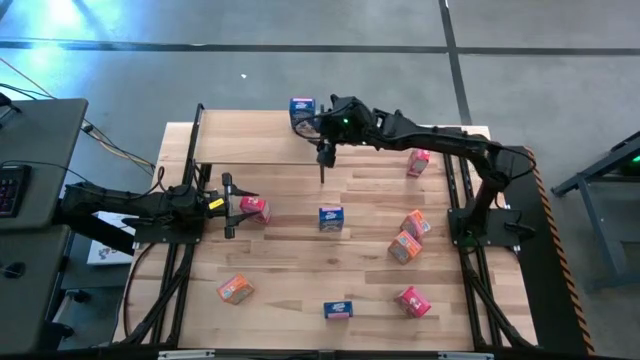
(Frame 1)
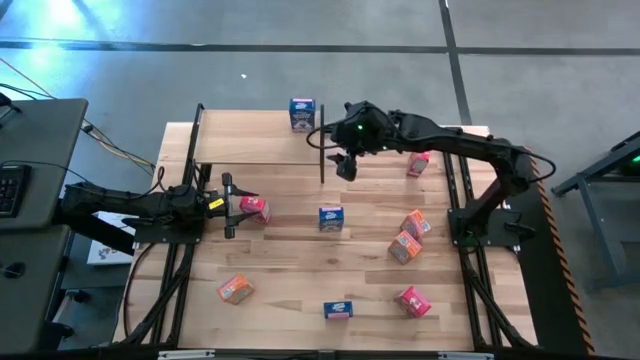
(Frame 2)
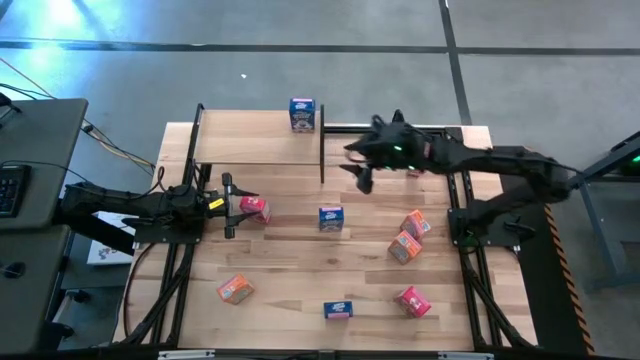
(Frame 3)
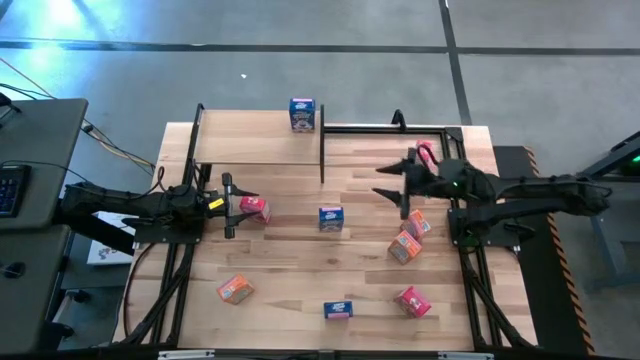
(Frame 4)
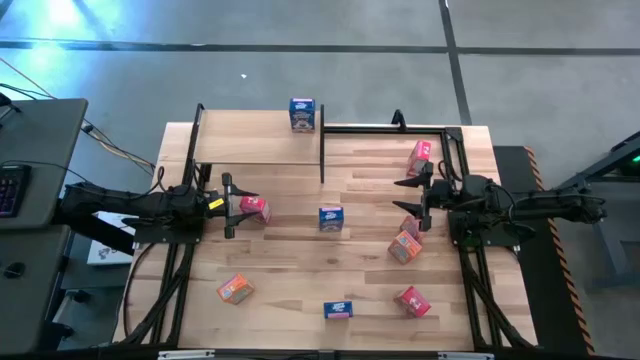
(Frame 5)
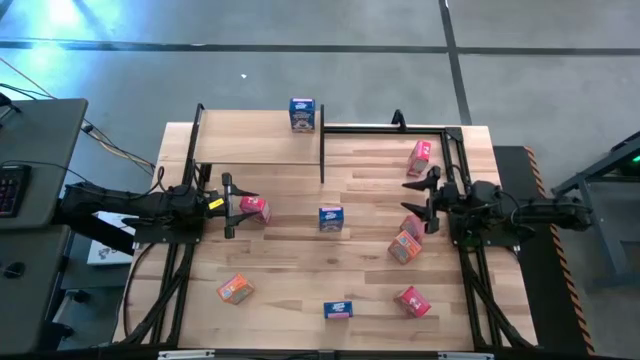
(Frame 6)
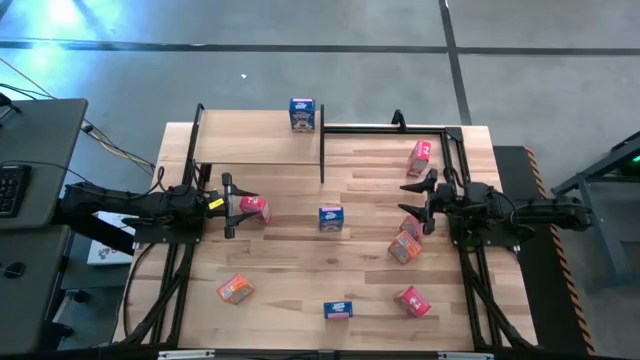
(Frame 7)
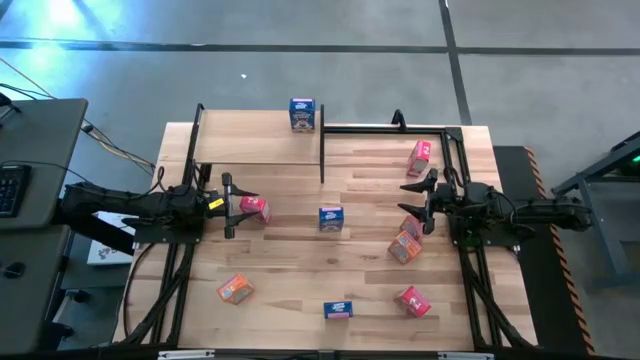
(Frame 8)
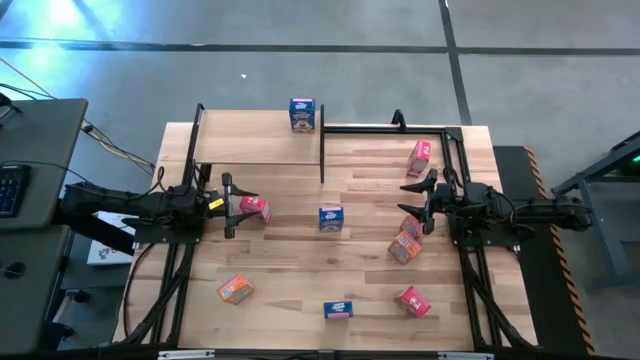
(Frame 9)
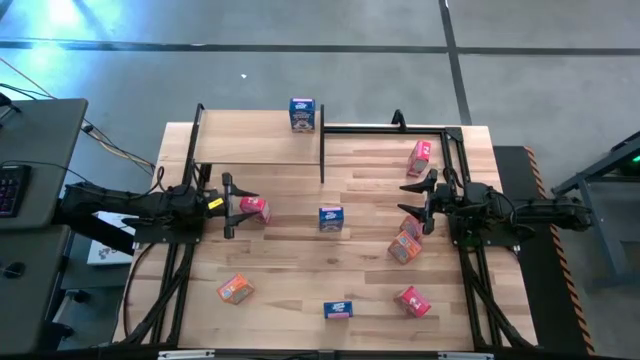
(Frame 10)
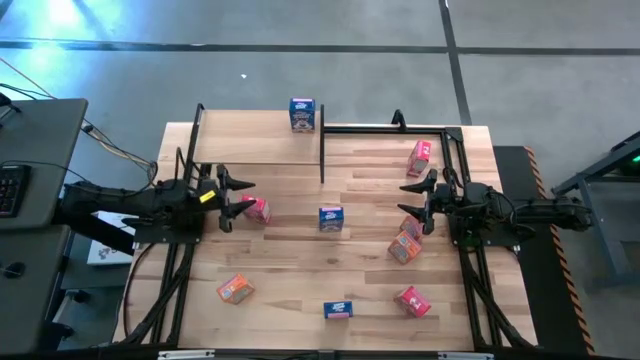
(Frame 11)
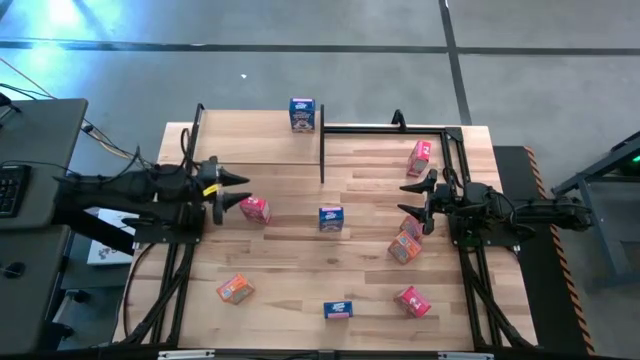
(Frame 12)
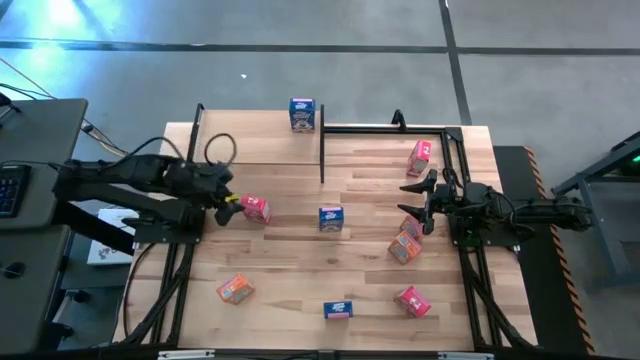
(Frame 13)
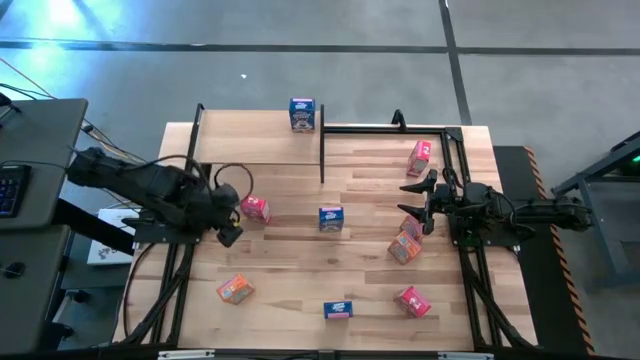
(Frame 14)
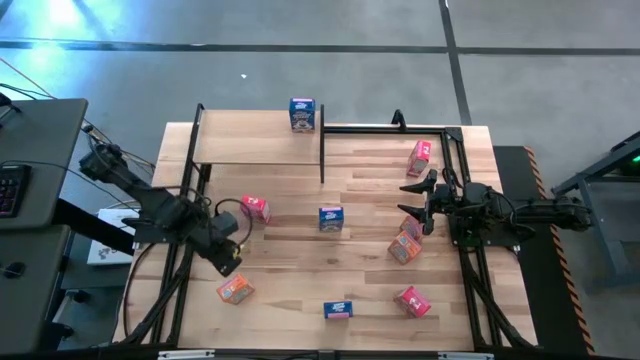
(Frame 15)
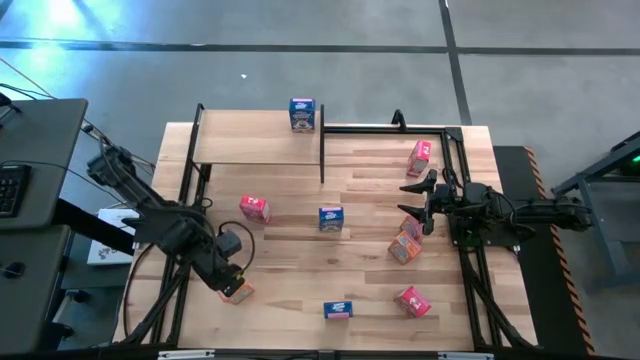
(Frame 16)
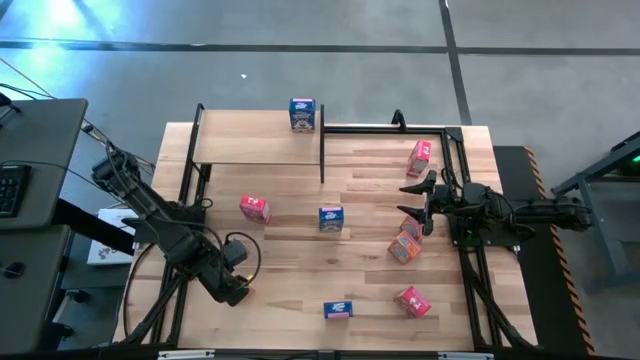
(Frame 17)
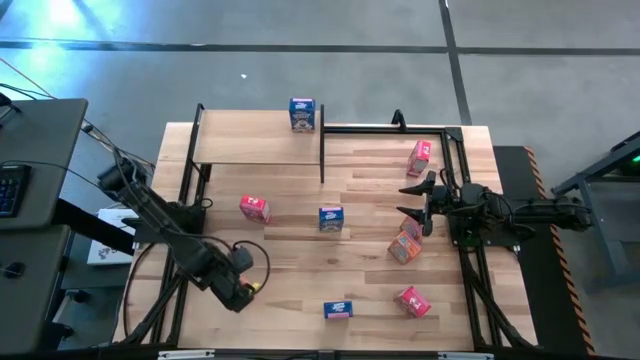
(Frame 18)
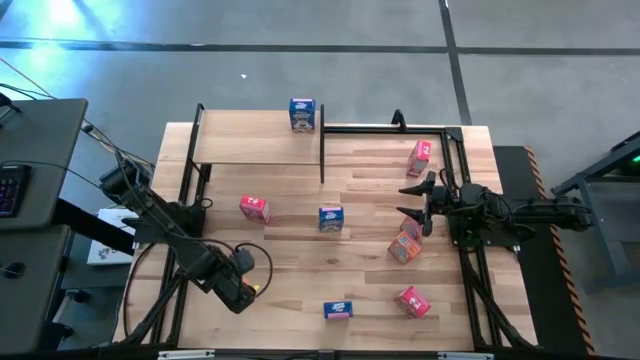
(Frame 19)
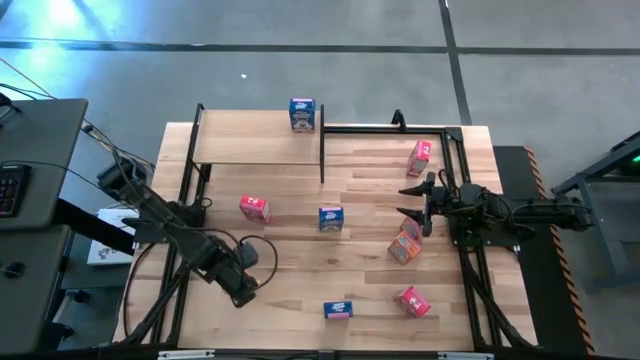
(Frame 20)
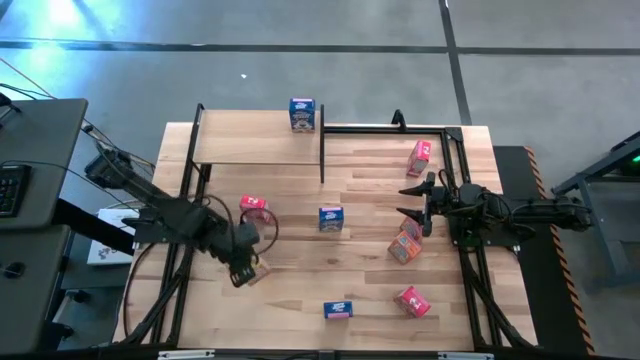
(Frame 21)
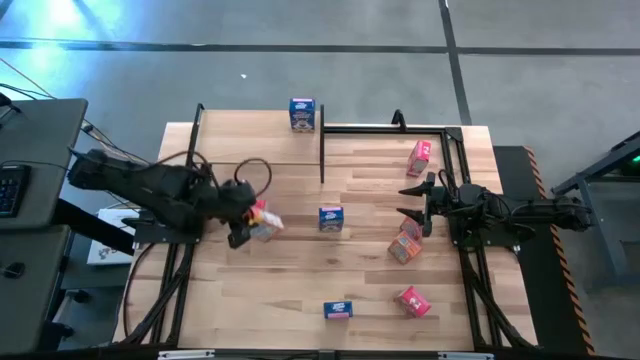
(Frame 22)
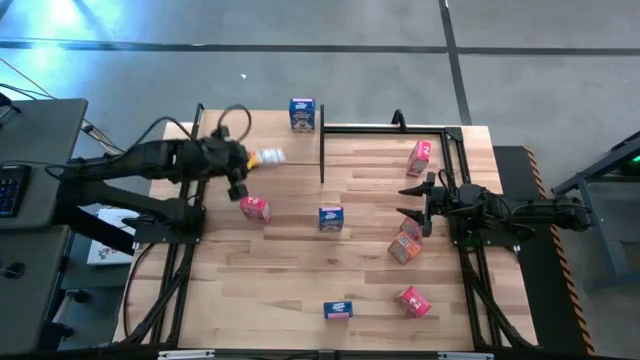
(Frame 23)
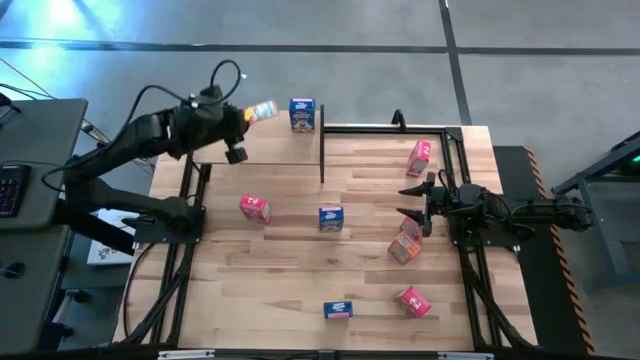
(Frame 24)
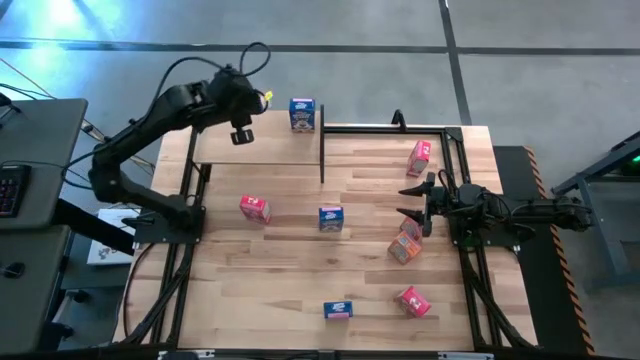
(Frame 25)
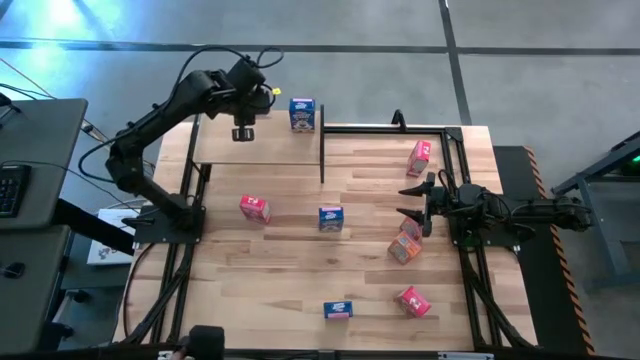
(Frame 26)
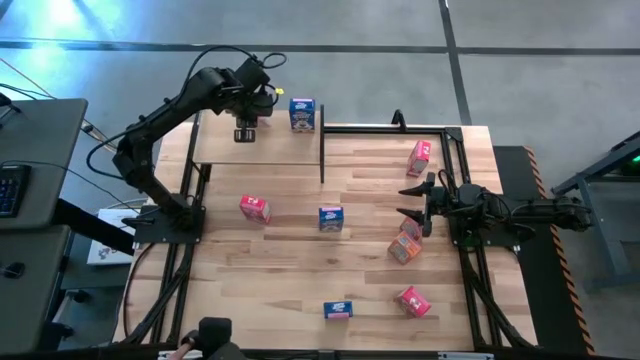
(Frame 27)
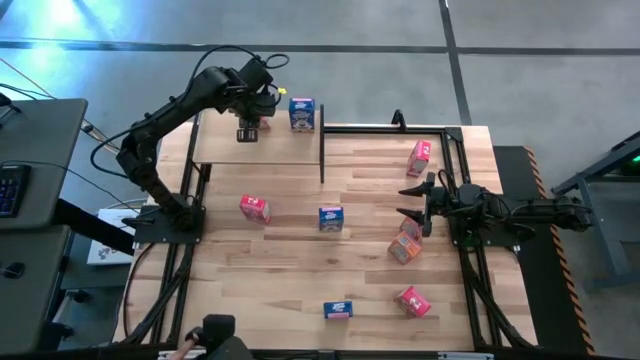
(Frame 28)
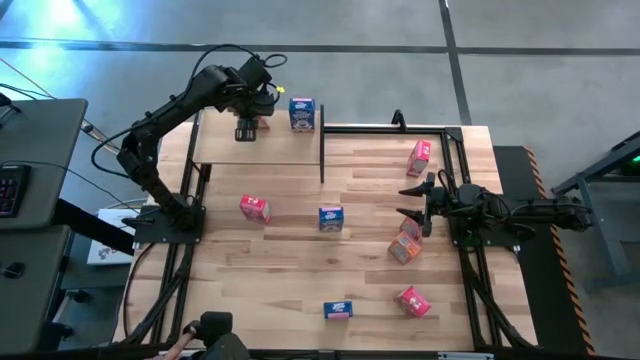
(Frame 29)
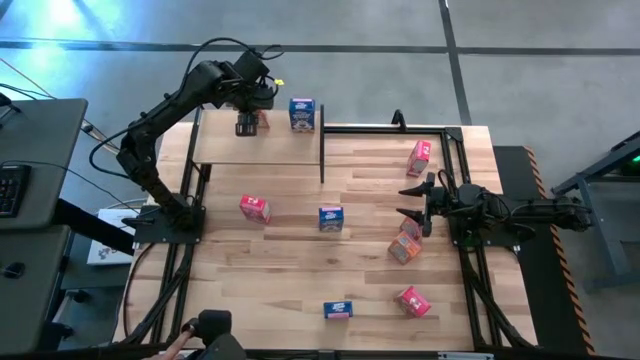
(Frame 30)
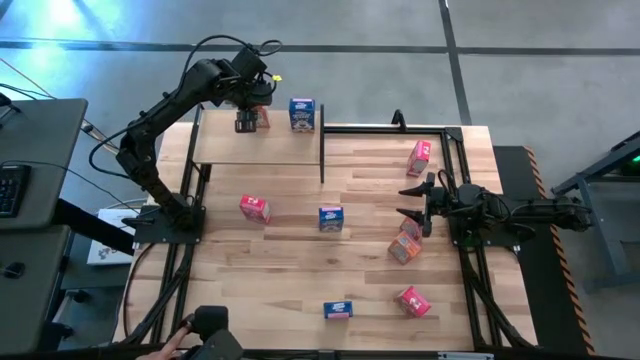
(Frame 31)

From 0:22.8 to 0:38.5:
Task: Stack cereal on shelf
Put the bottom left orange cereal box on the the shelf

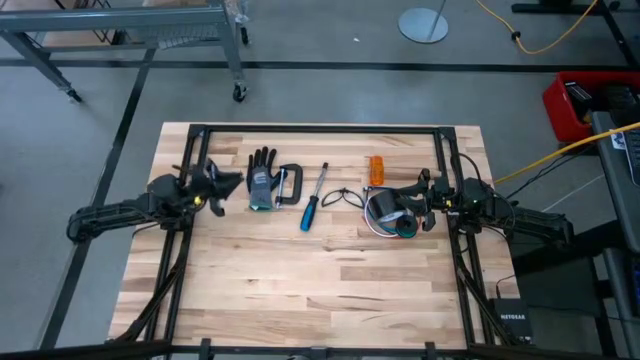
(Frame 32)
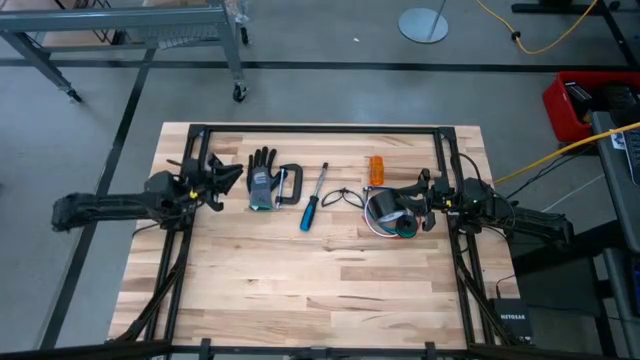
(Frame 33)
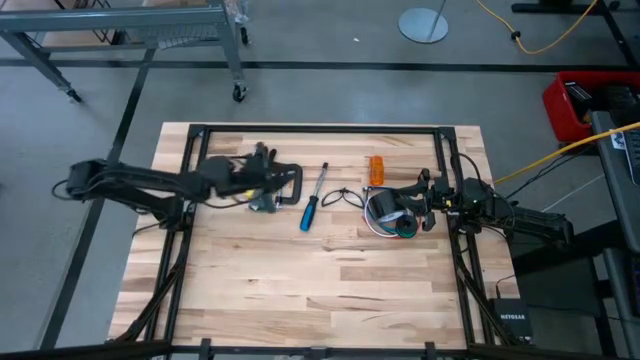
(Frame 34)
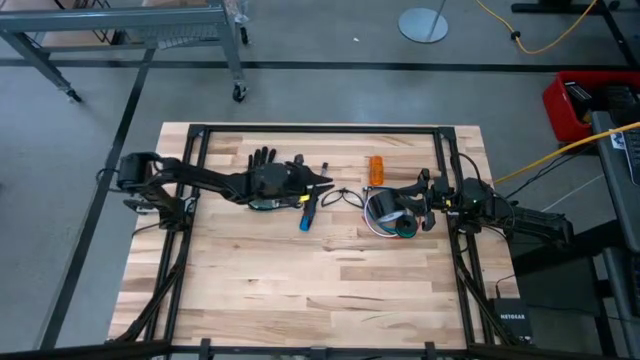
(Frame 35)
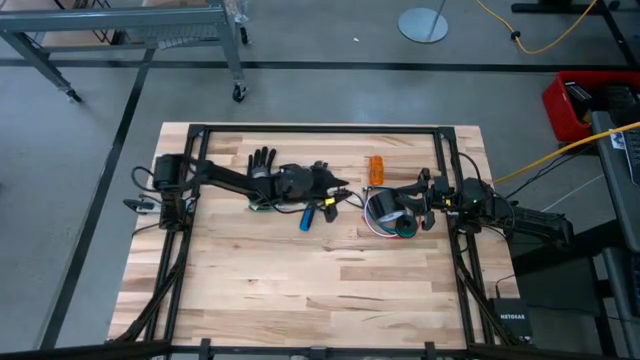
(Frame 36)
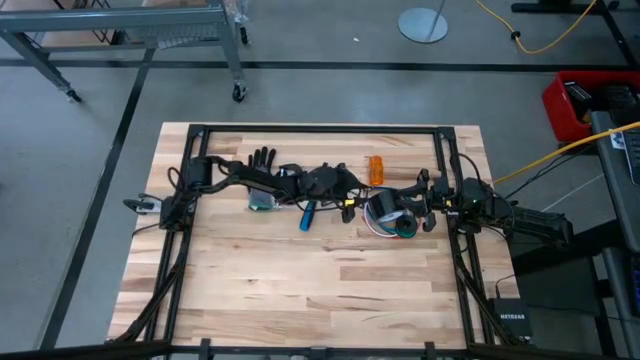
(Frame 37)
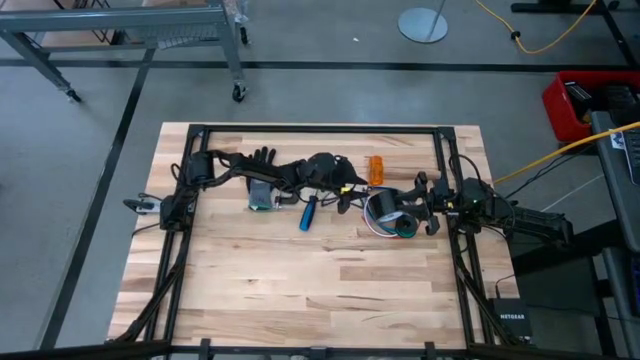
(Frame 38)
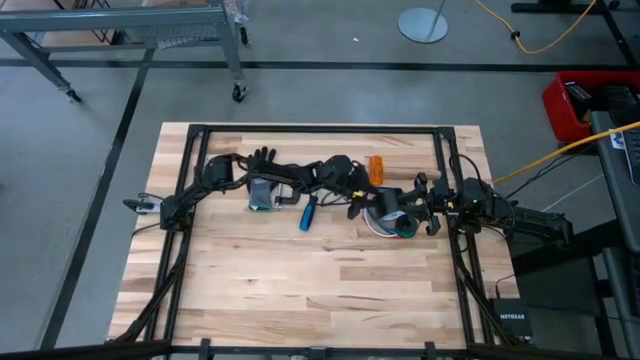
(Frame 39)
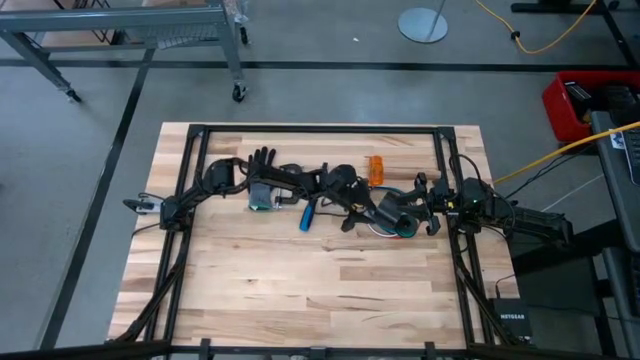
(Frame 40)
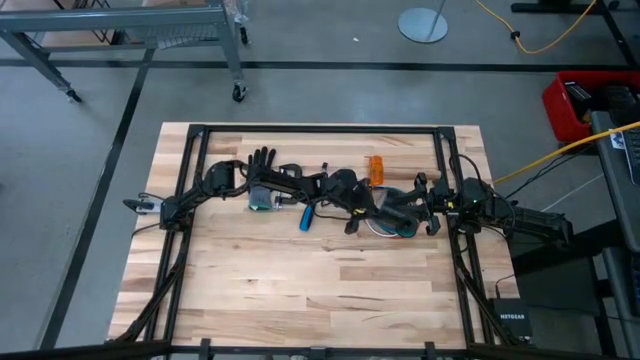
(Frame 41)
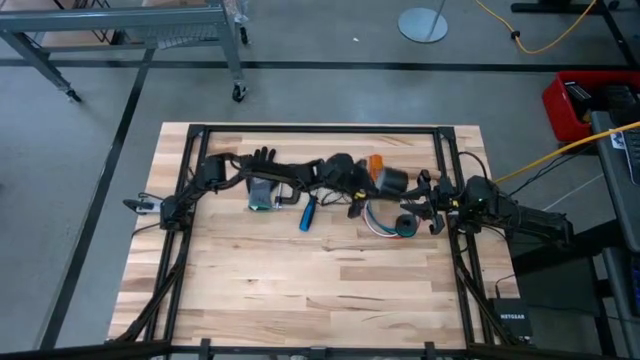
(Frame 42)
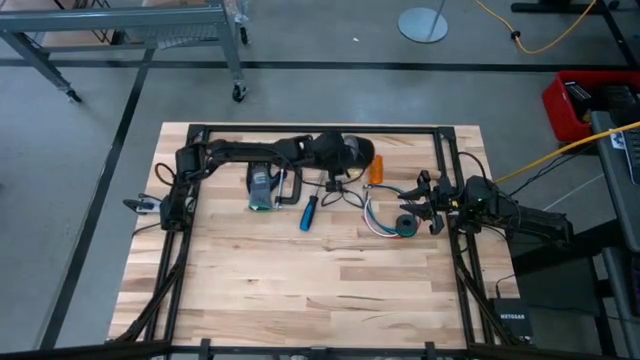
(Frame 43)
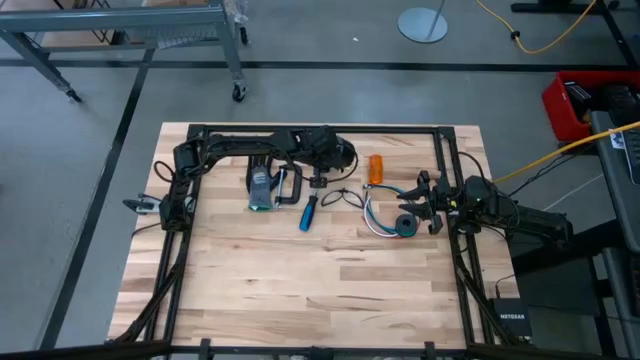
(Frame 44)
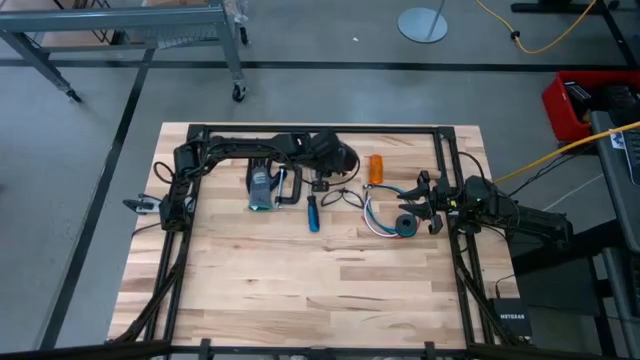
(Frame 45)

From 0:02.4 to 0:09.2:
Task: Coil cords
Move the electrical tape to the top center of the table
